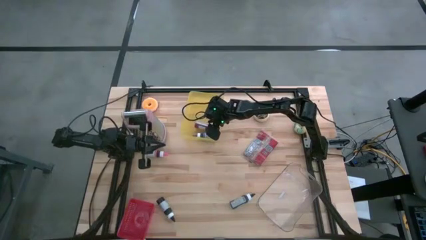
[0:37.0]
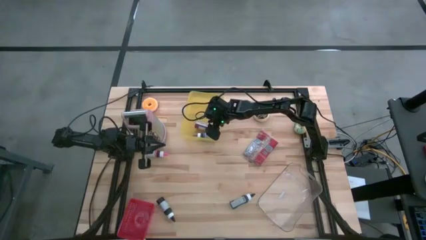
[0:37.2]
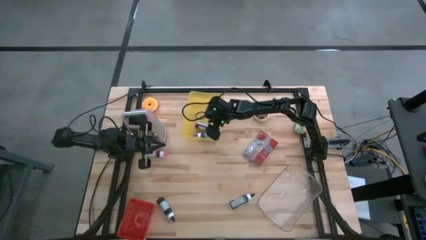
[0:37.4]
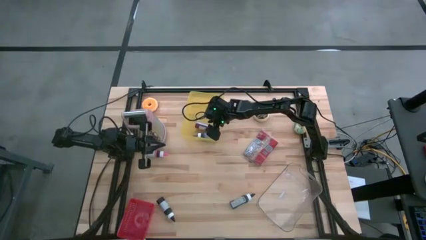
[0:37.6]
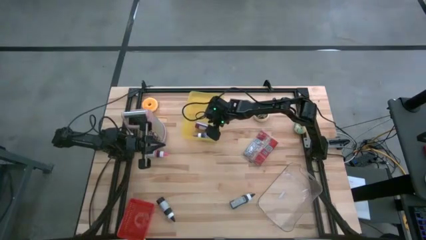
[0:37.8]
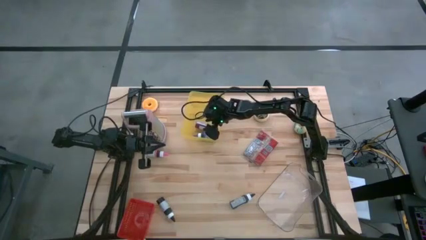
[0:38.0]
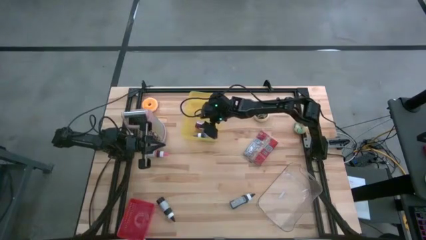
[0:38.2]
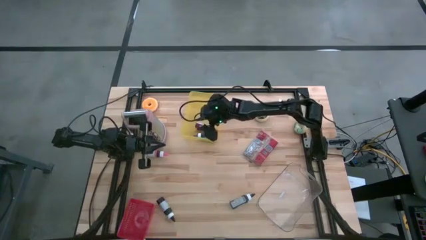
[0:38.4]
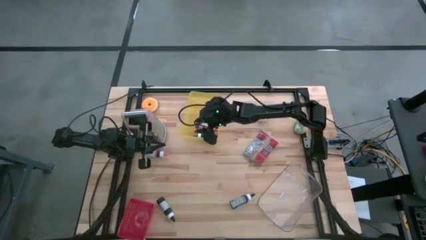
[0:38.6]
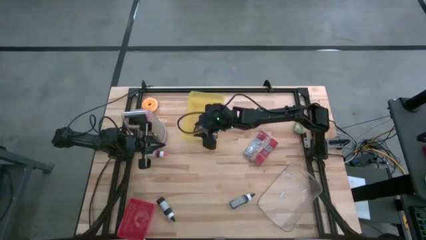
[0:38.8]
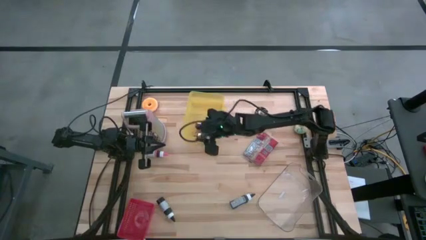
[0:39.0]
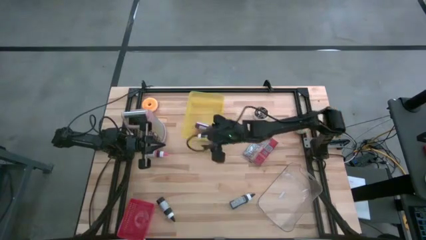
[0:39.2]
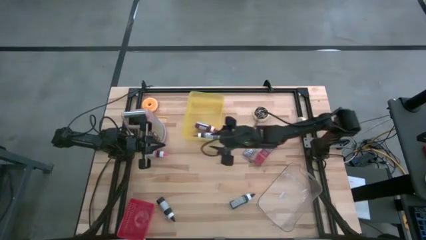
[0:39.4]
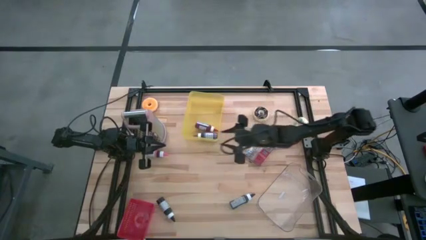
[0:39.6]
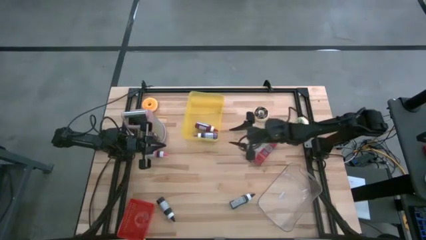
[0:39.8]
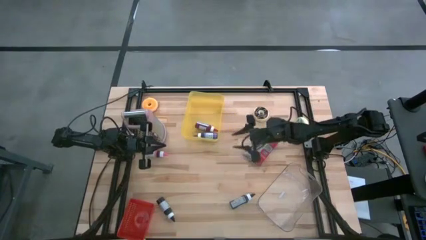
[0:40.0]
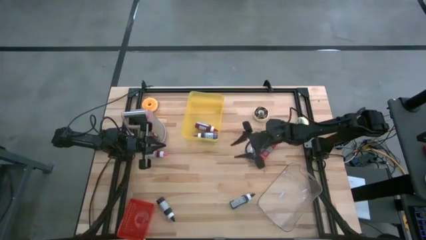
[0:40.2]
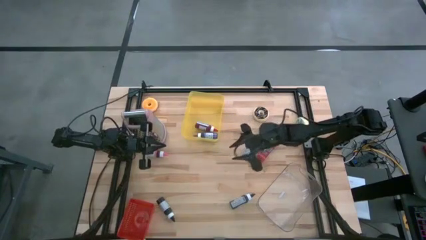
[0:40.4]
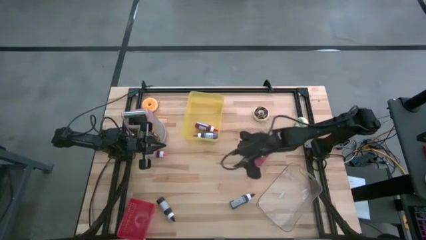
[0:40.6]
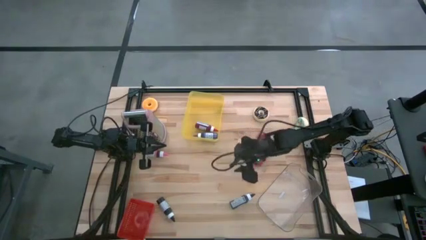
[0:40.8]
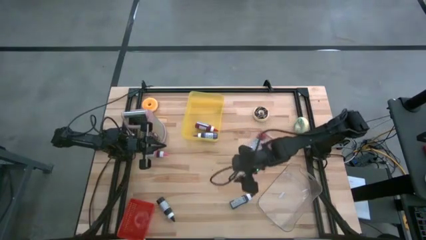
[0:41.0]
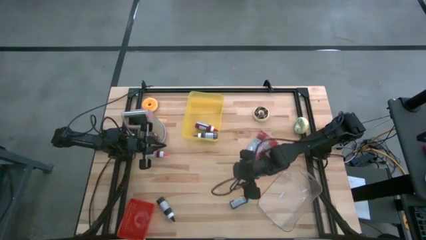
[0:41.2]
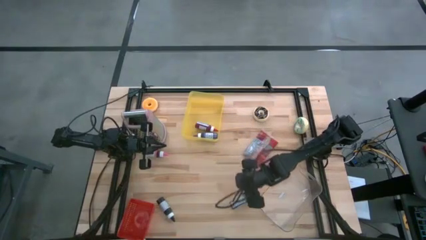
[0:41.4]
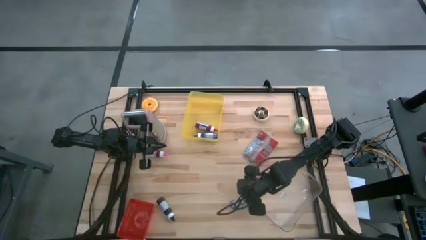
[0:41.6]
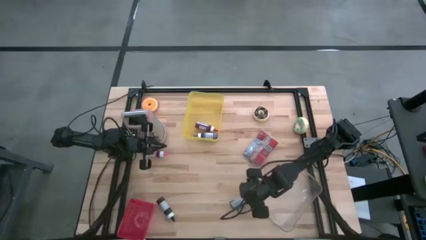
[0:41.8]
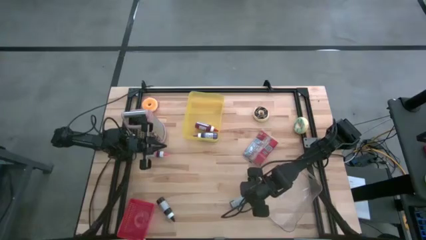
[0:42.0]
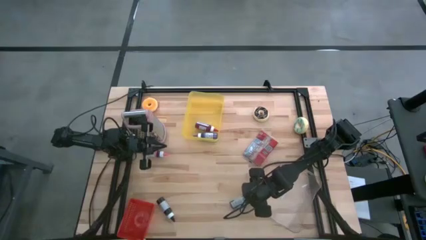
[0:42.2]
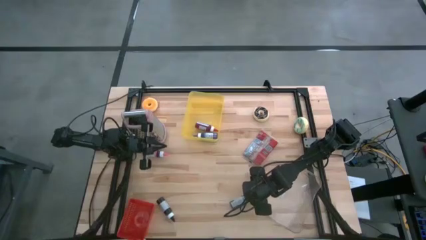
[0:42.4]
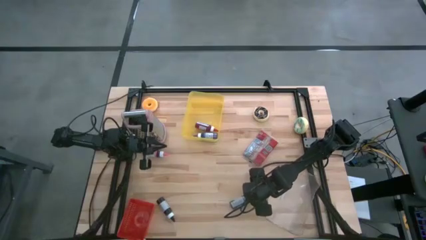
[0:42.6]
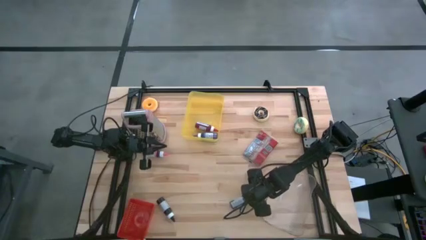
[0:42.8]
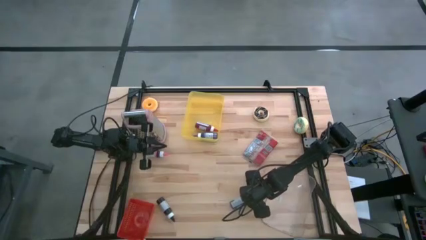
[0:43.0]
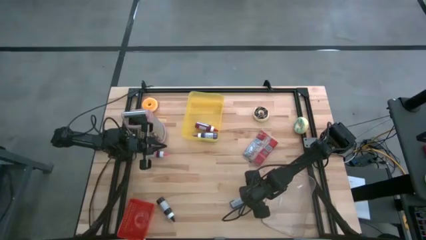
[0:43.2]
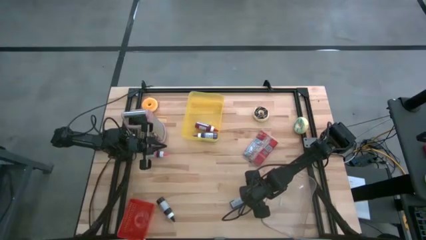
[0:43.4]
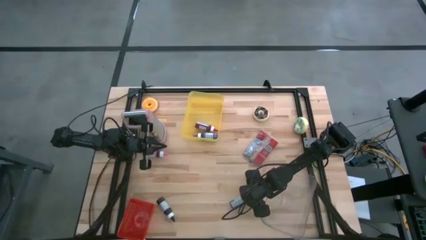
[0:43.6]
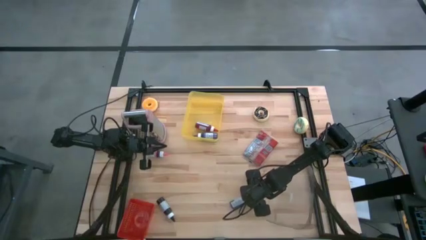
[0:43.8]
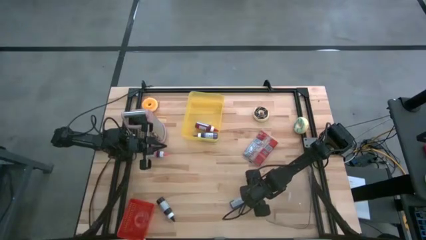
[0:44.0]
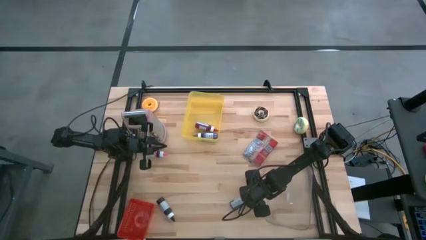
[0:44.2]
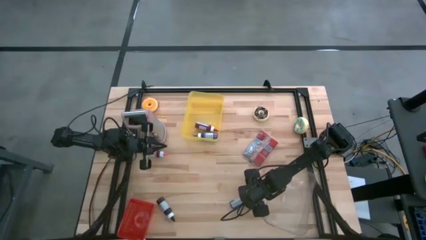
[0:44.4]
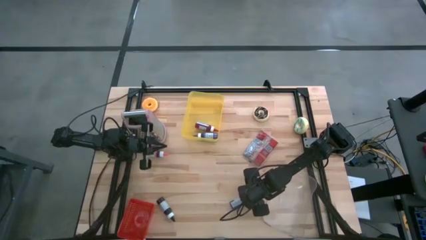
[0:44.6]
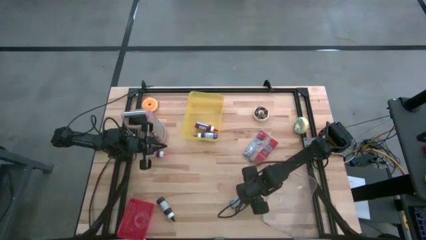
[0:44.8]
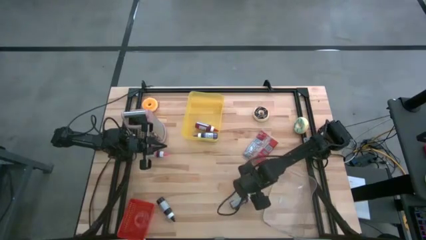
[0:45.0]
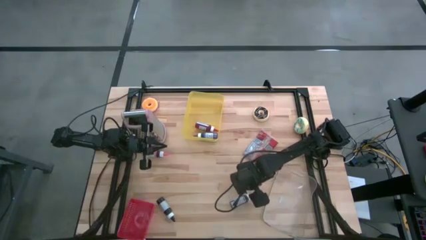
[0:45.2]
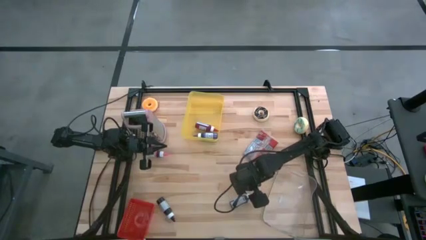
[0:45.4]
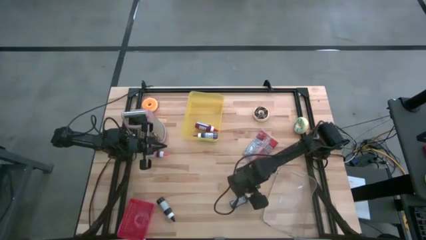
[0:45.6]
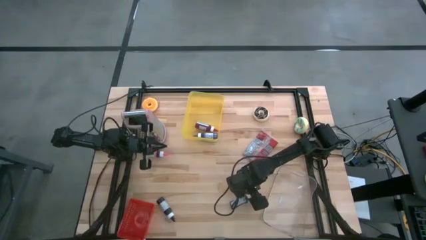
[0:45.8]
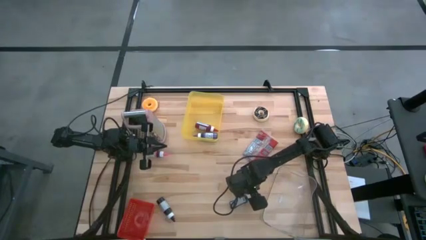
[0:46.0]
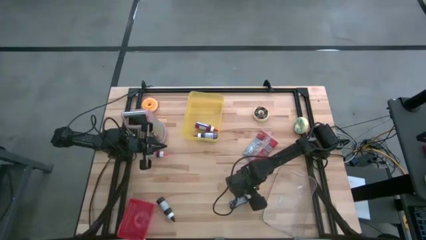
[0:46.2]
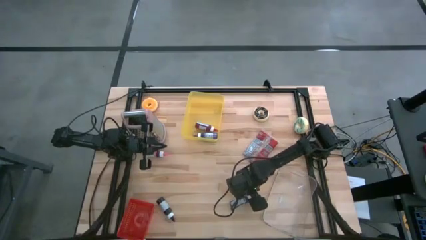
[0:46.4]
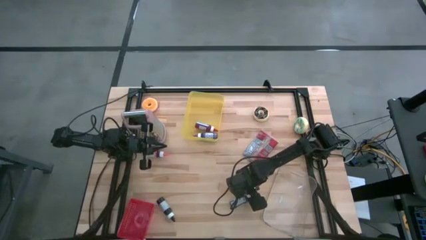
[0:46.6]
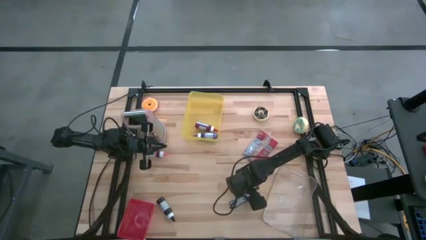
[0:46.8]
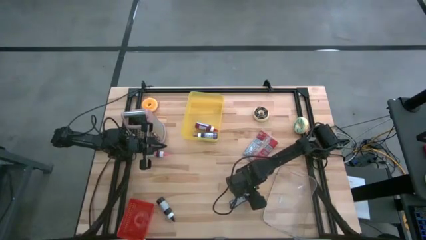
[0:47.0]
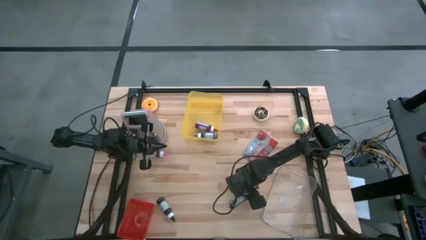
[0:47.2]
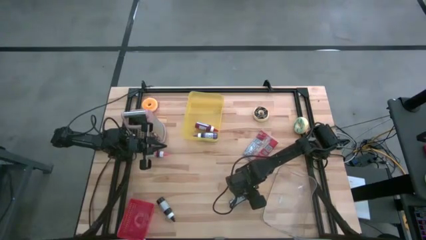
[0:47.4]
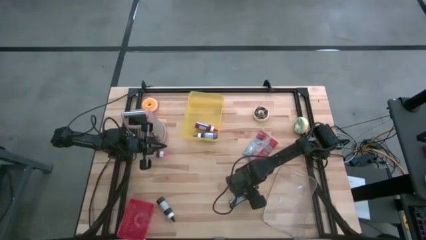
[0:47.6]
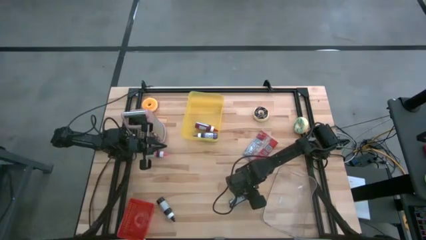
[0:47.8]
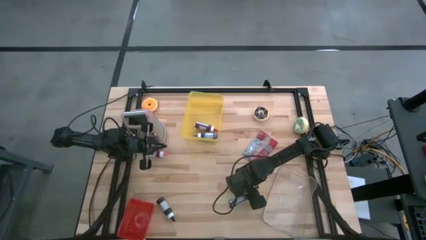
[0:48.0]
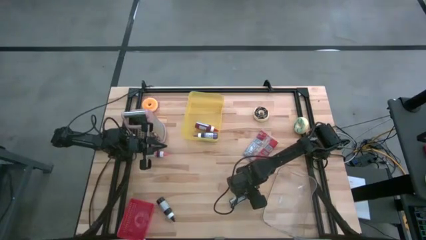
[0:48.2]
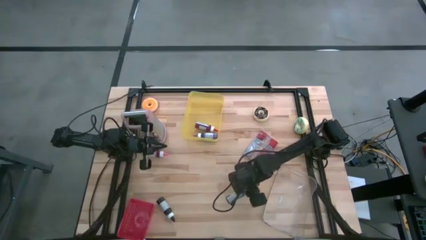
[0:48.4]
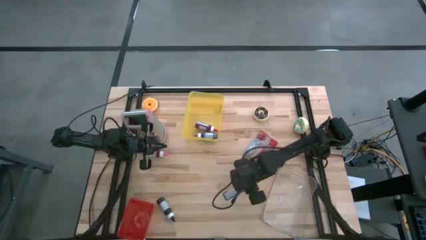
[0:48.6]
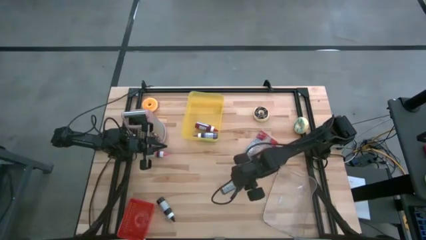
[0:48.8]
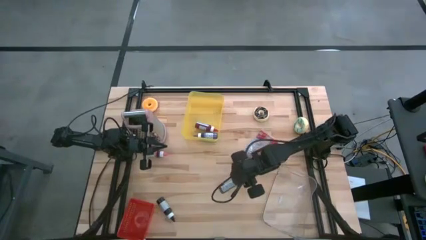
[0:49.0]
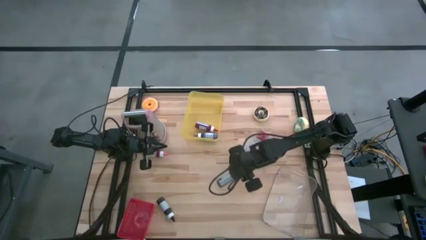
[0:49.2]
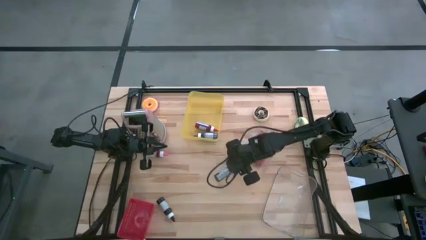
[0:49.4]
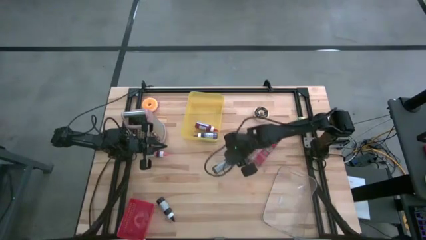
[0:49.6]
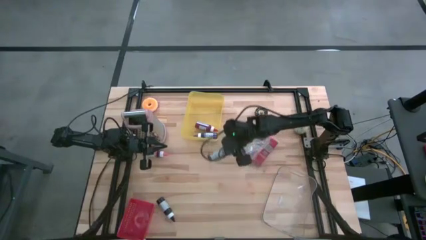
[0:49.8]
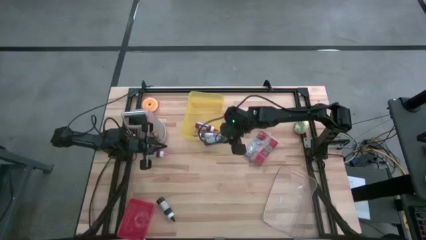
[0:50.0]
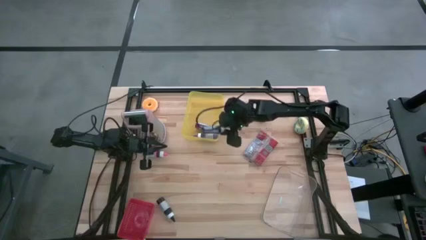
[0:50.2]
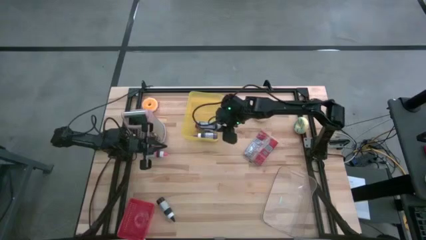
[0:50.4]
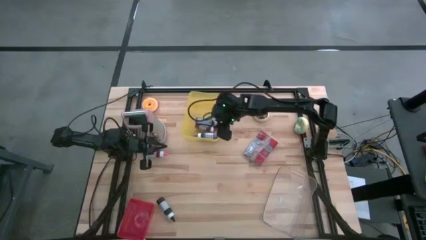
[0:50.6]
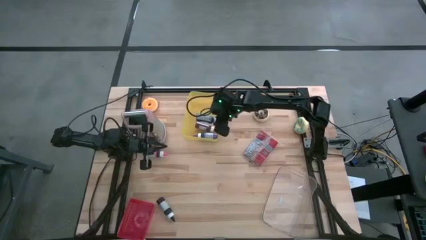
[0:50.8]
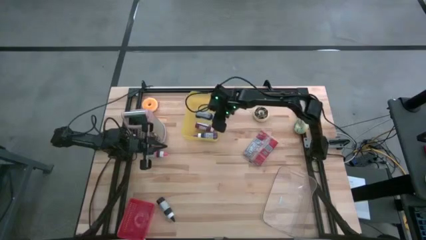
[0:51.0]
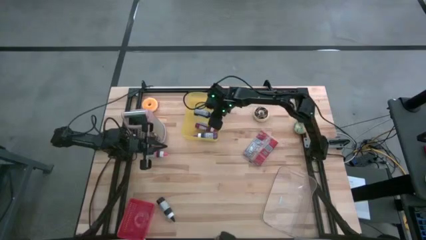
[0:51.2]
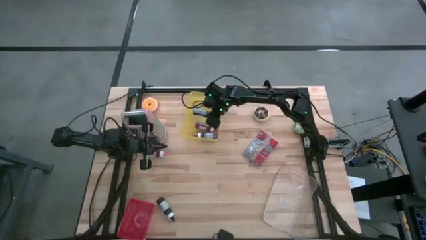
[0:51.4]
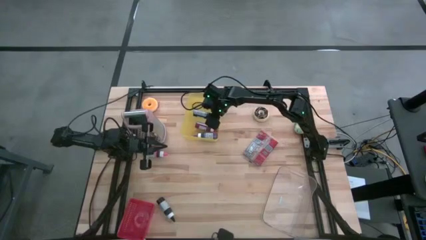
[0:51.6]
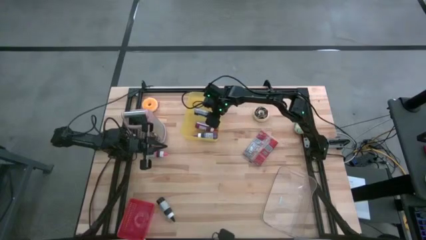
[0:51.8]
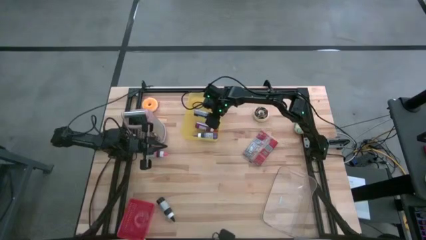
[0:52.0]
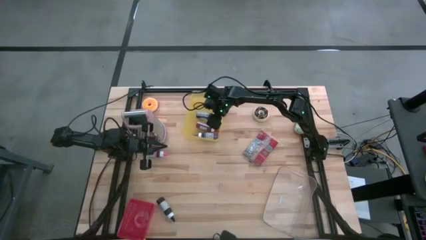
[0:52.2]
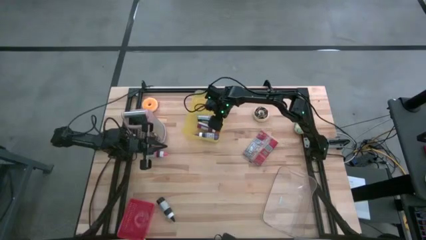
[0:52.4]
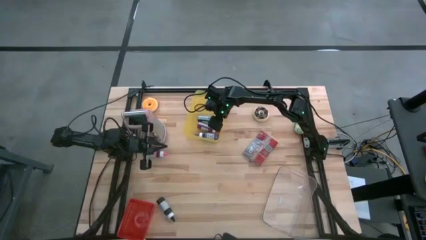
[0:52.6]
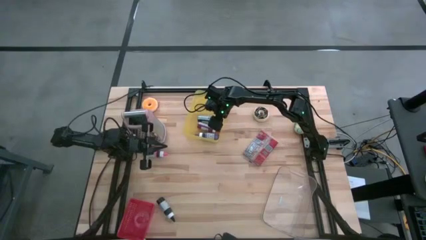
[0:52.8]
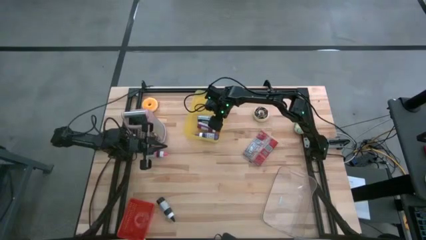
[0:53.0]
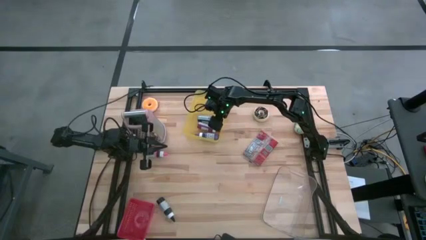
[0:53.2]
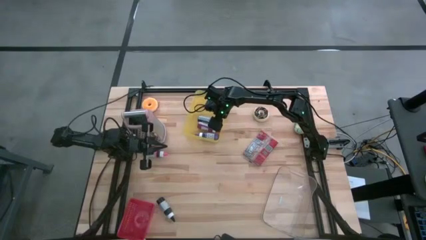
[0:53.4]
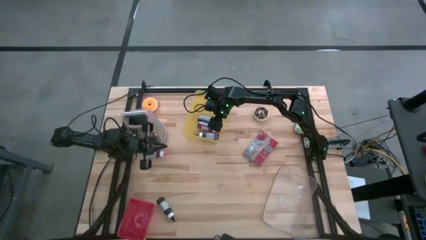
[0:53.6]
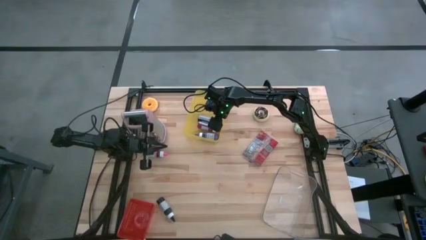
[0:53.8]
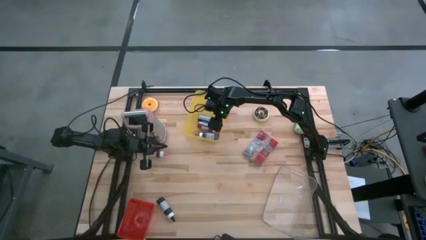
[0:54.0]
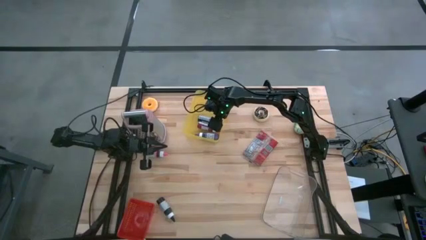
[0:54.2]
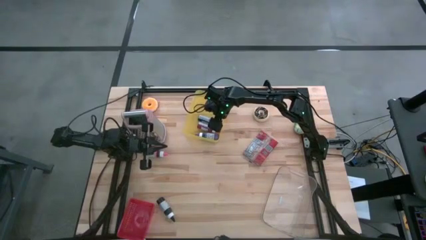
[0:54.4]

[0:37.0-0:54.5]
Task: Pick & Place Food Item
Put the right black food coloring into the yellow bin
